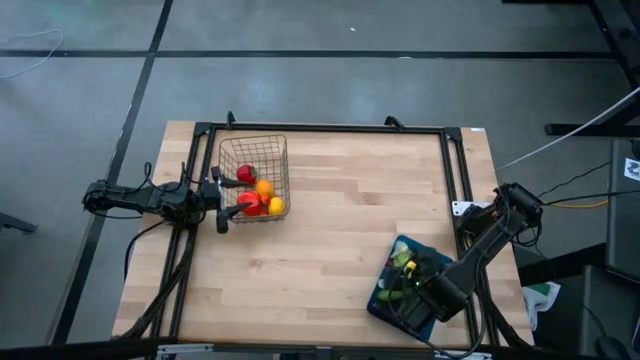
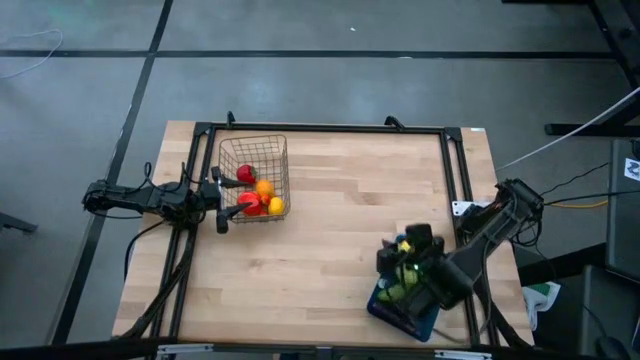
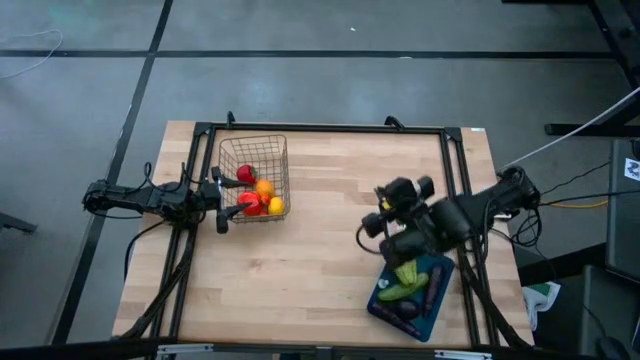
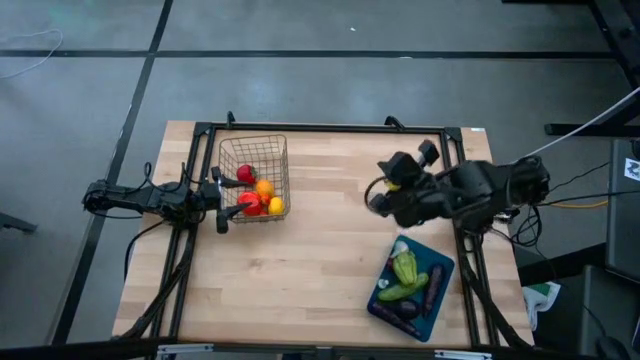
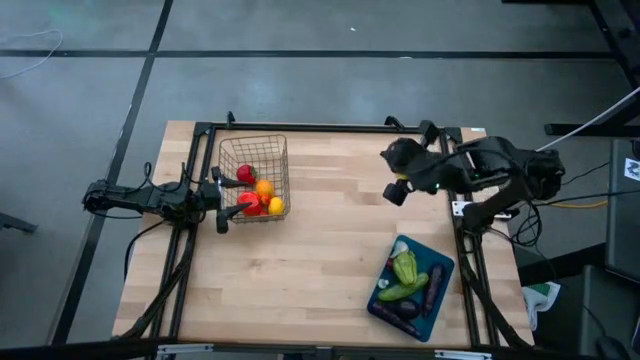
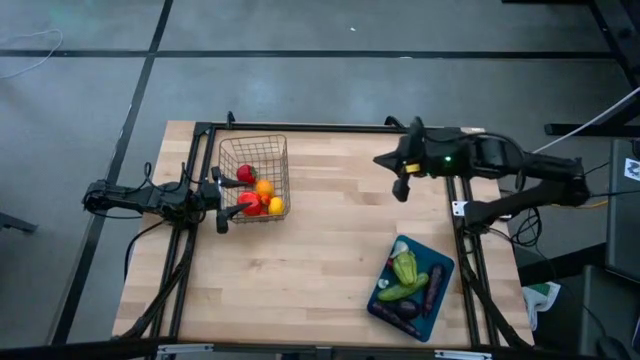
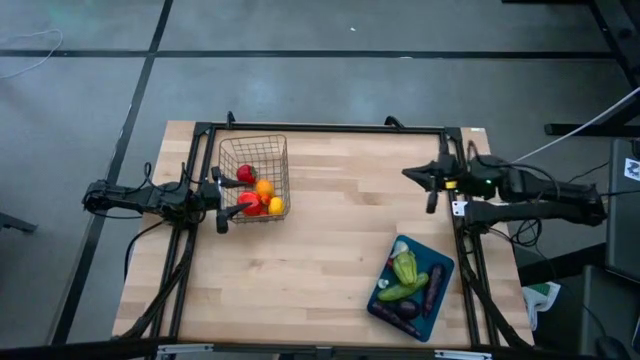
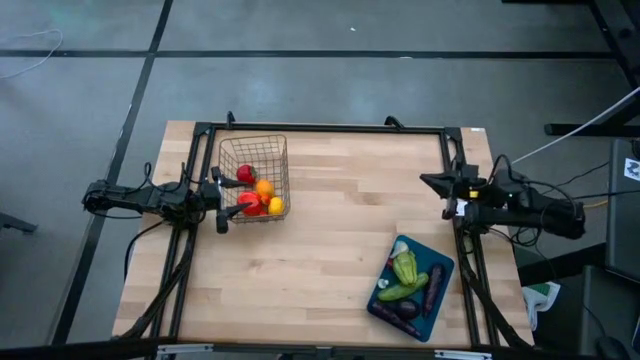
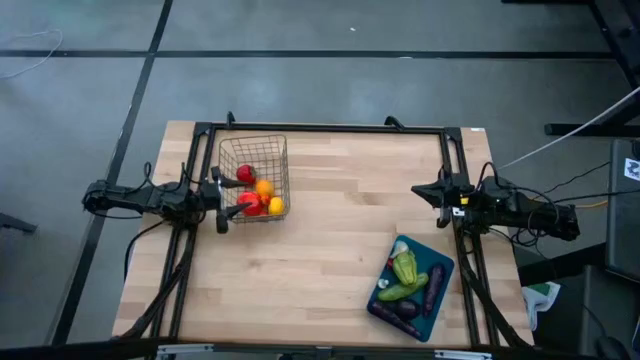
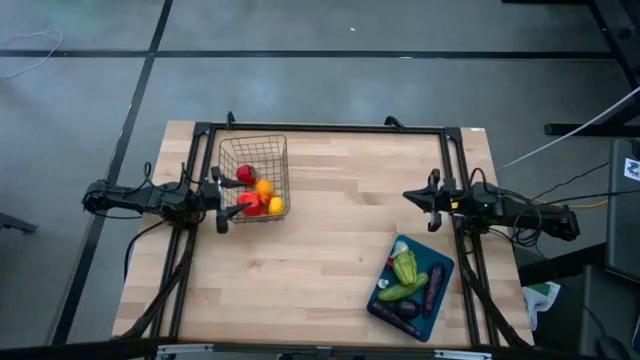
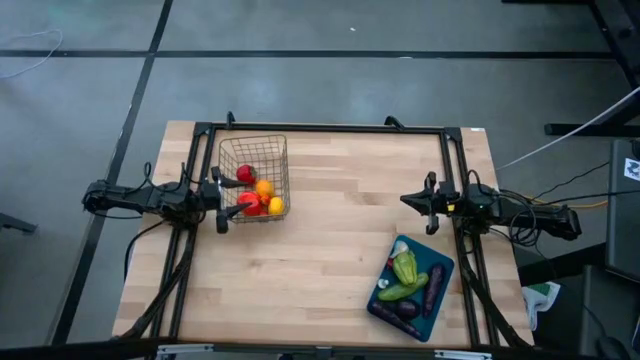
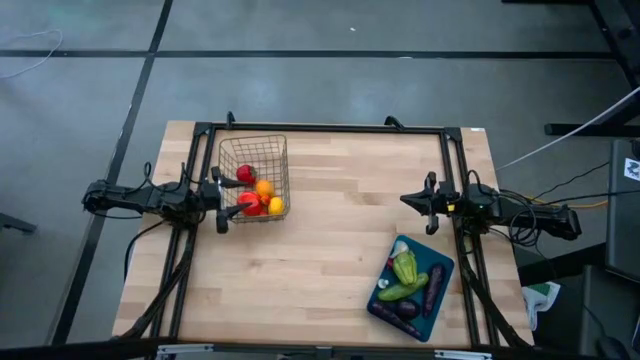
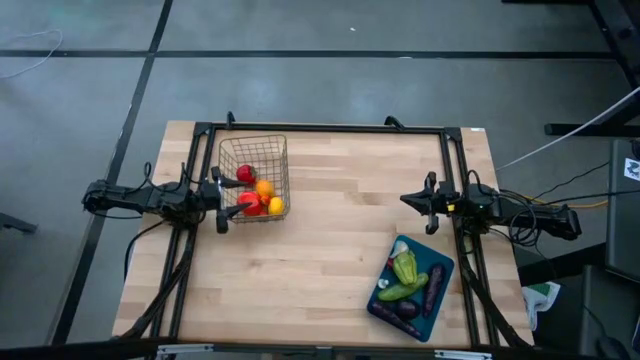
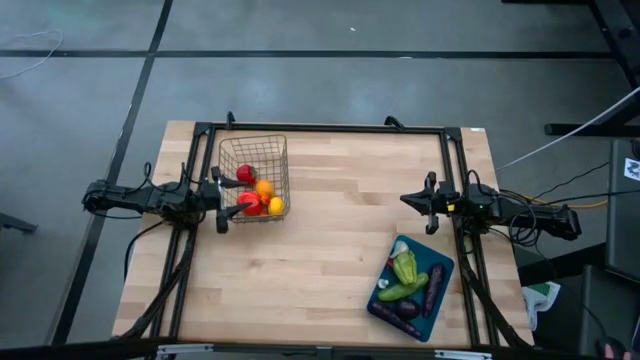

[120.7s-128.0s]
Task: Sort produce into baskets
Return to Home Position

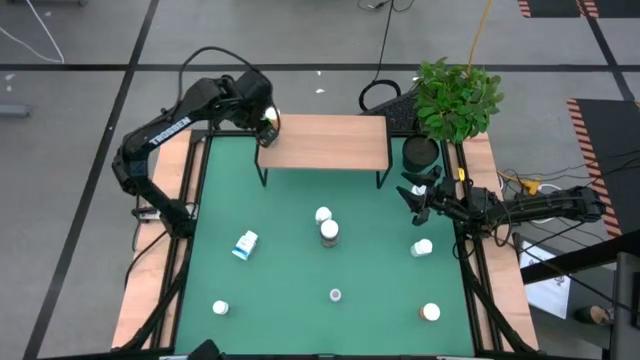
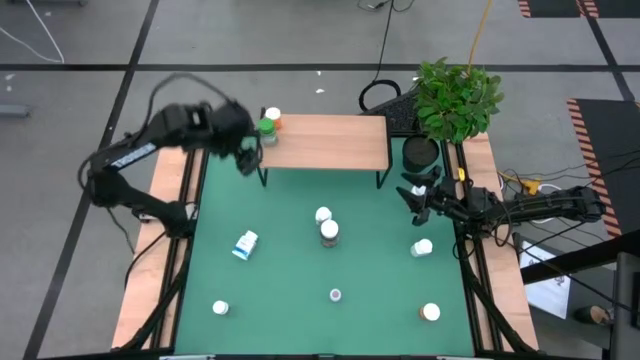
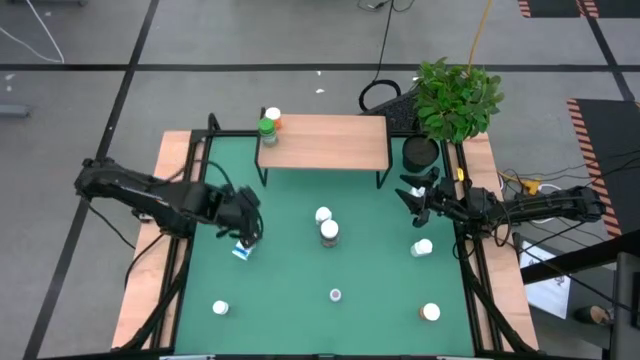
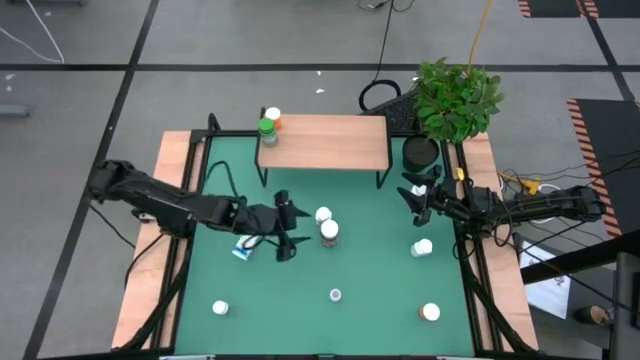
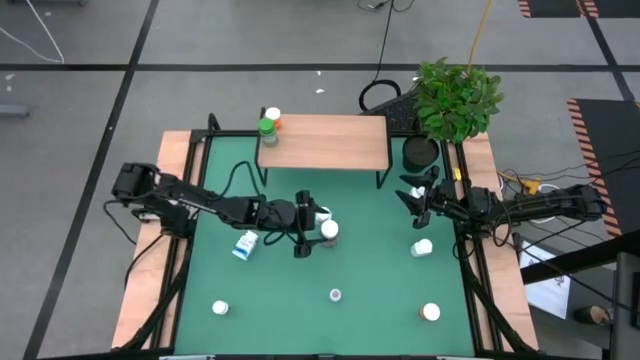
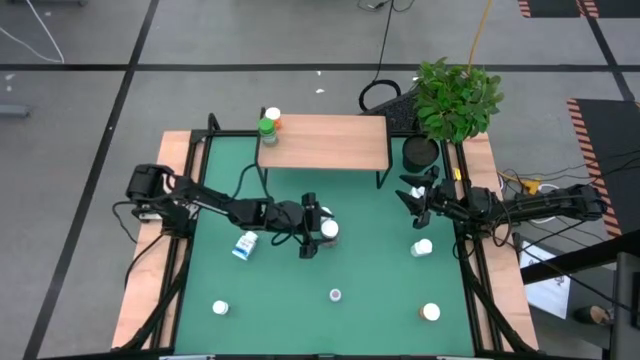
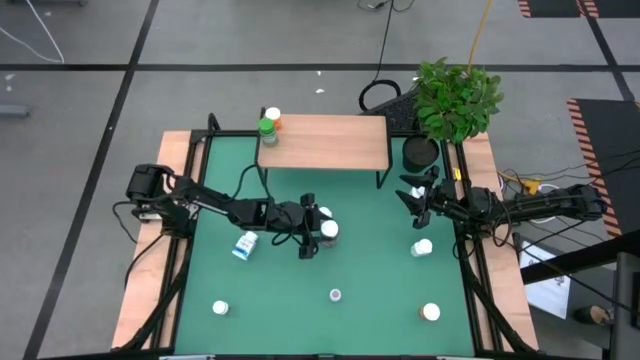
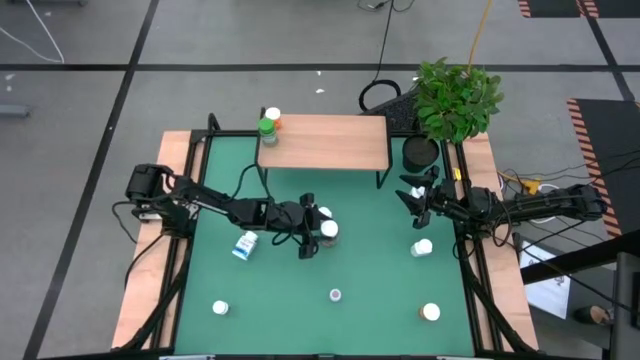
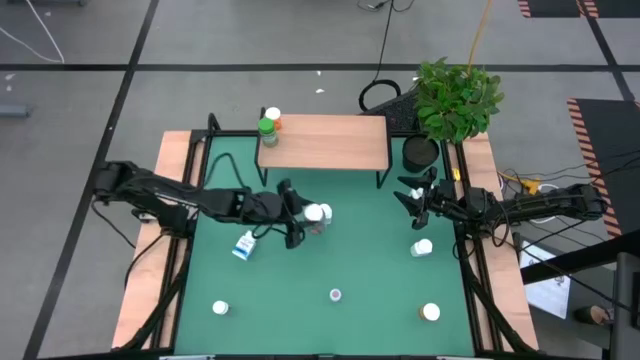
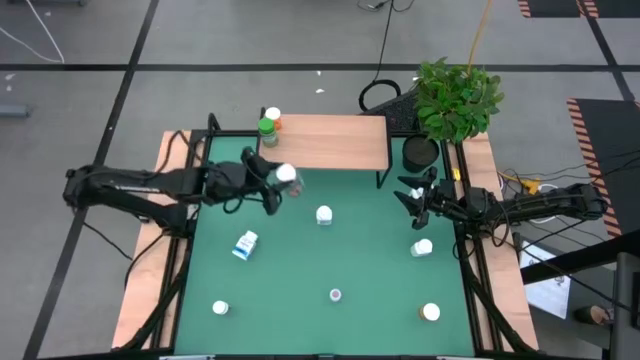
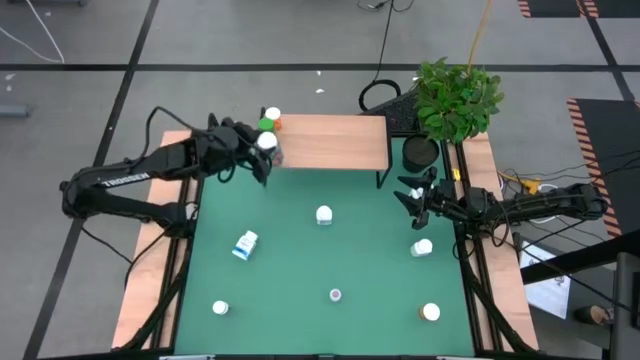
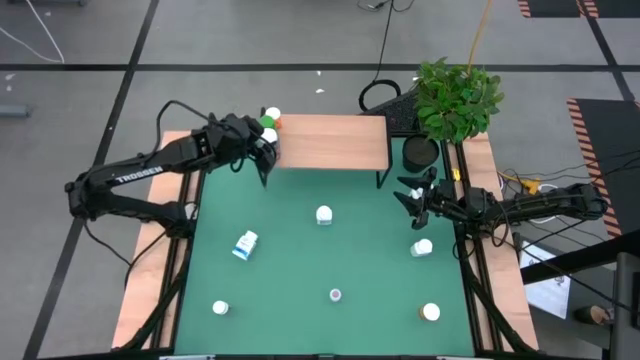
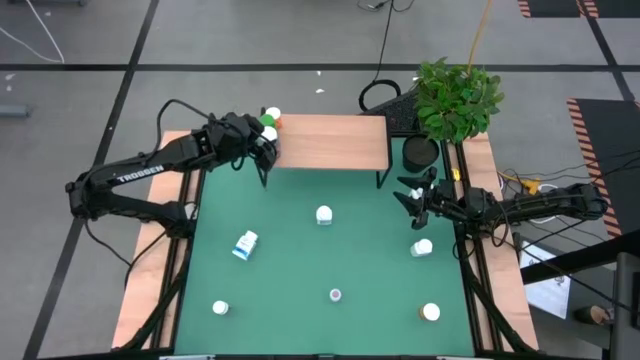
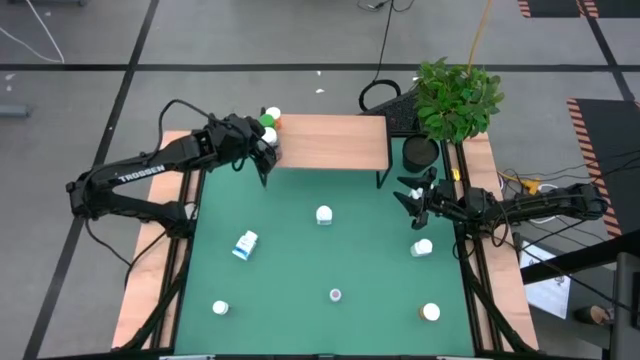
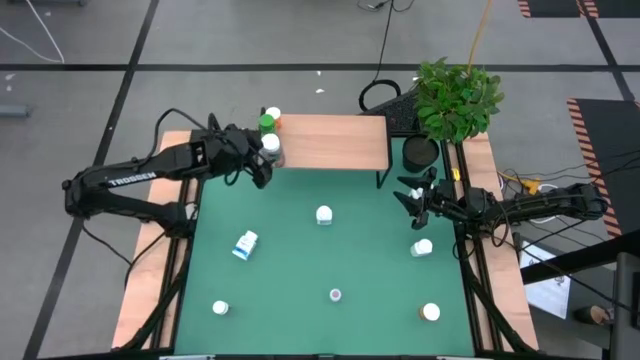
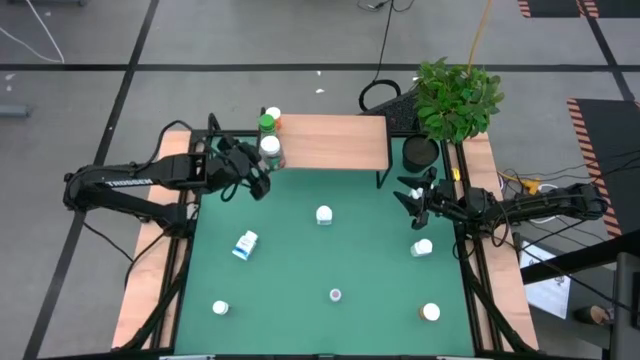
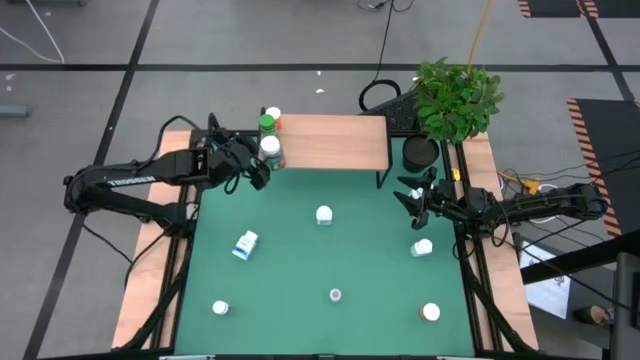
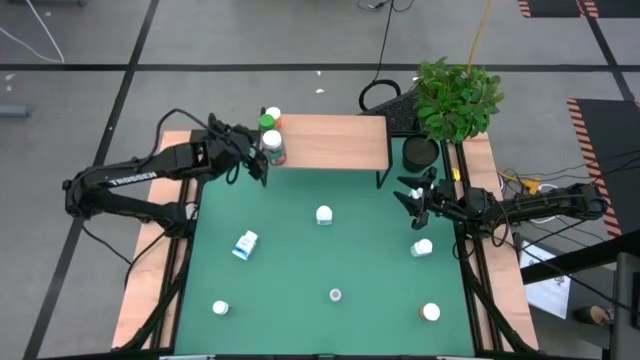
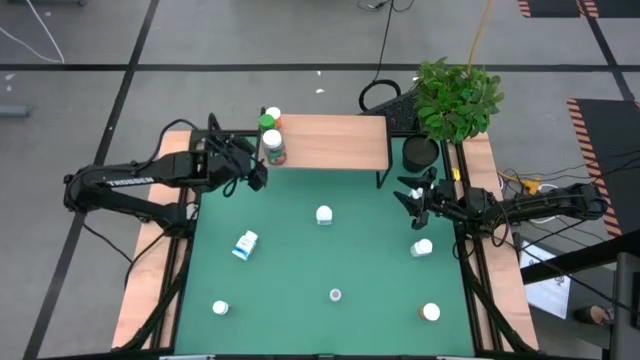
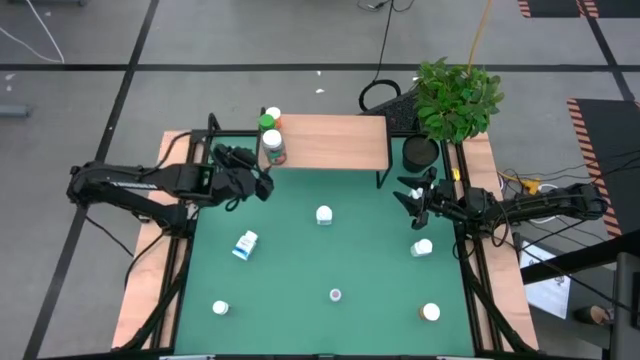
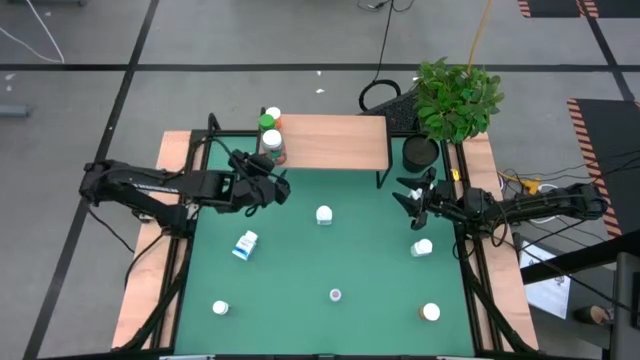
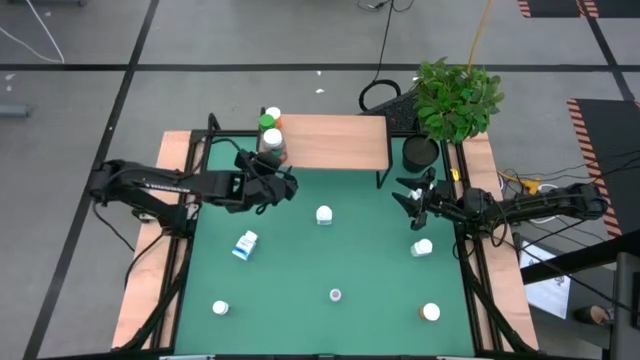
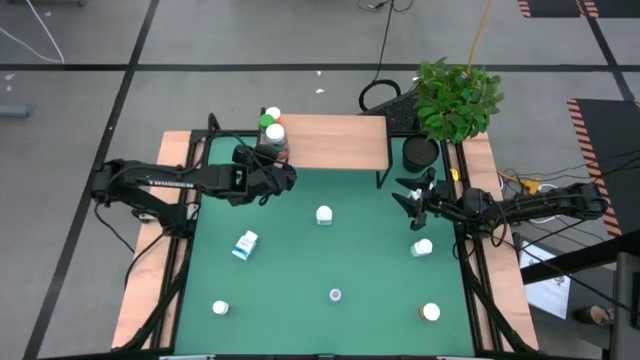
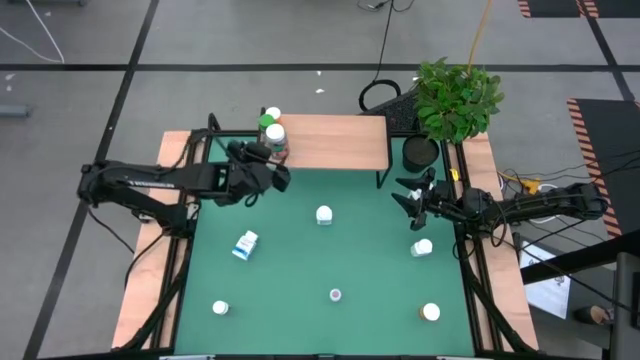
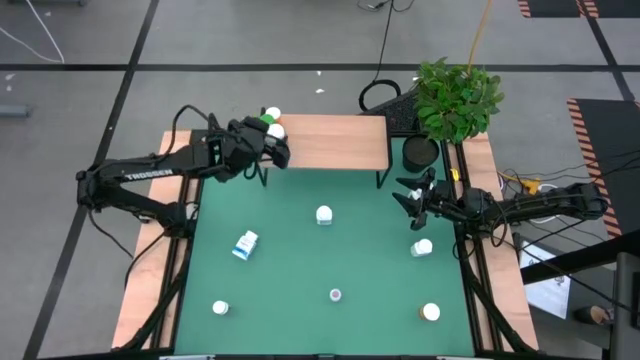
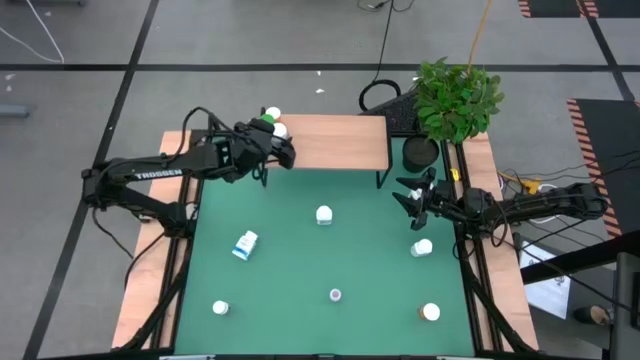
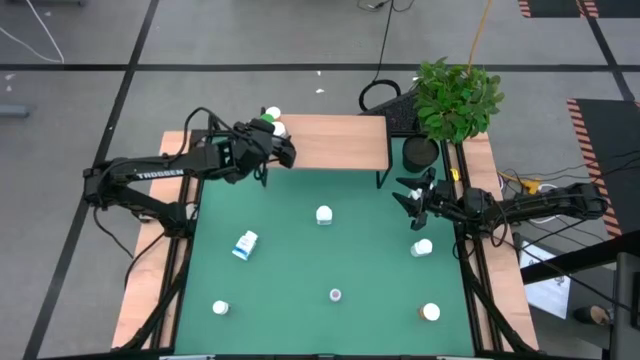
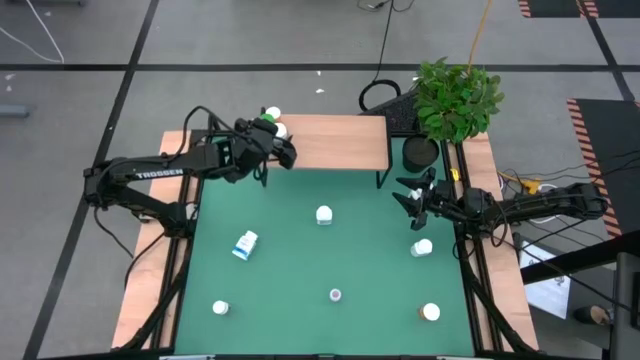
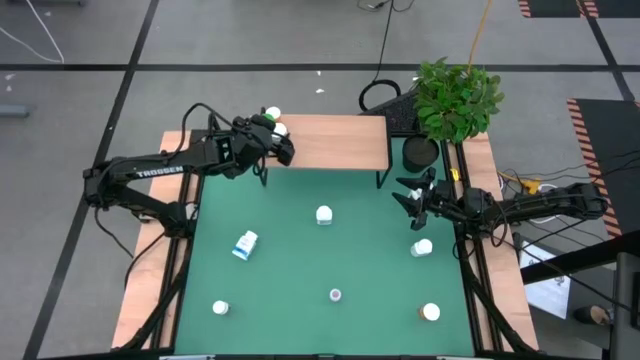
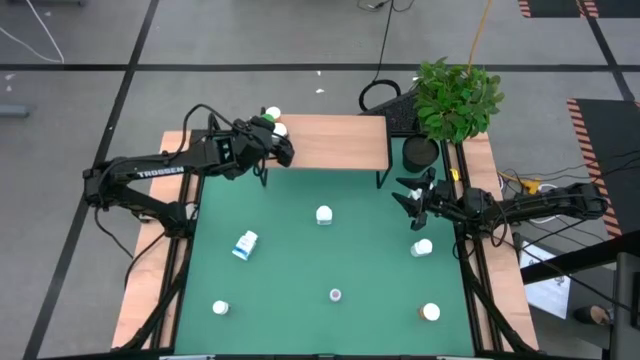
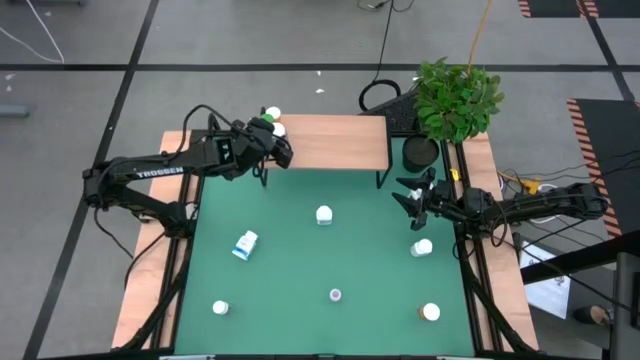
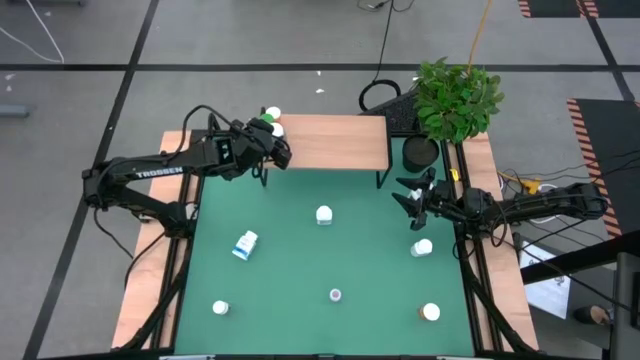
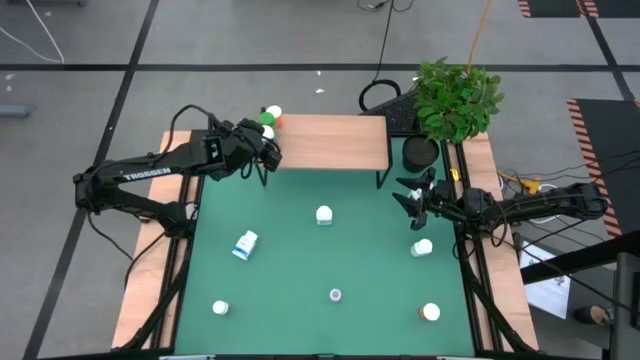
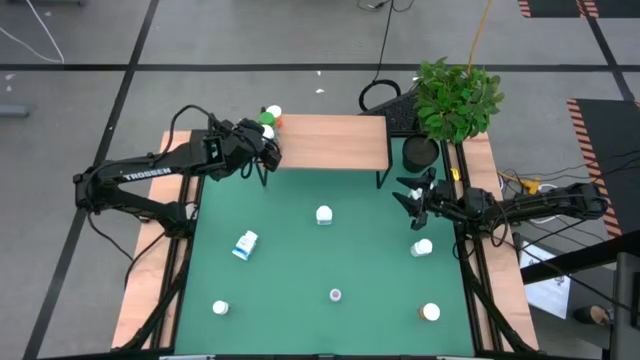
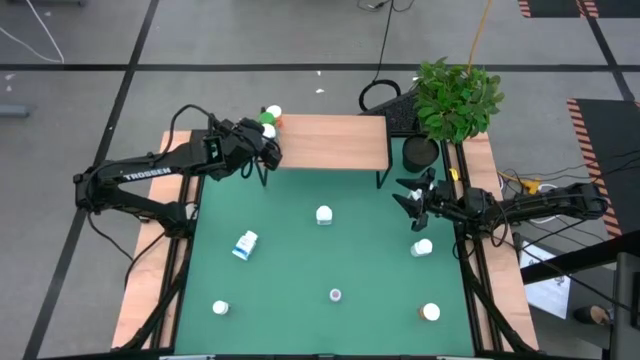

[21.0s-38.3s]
Task: Pick and place medicine bottles onto shelf by color
Put the dark green bottle on the shelf
